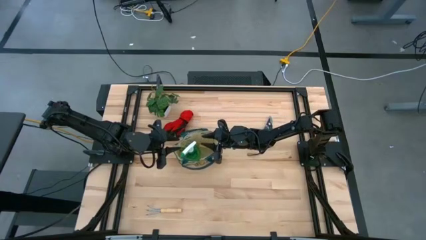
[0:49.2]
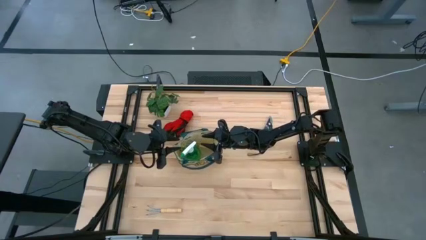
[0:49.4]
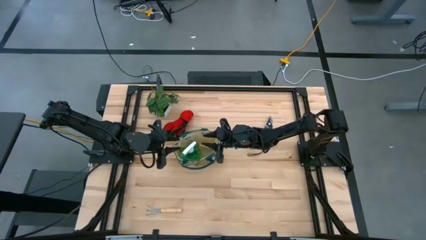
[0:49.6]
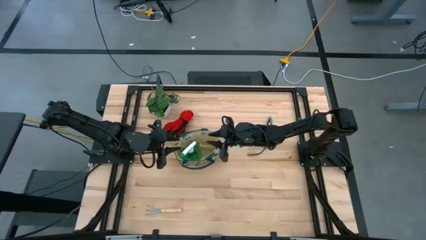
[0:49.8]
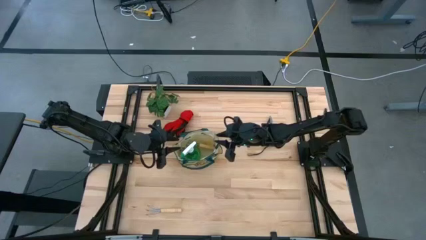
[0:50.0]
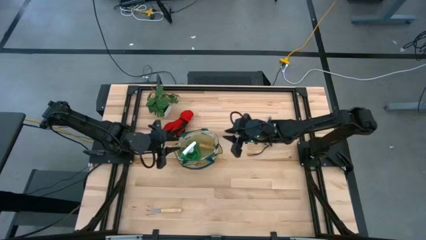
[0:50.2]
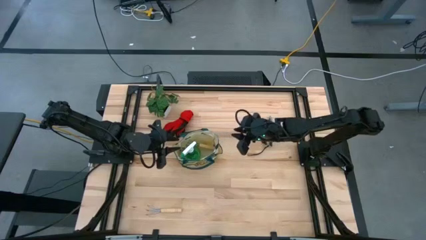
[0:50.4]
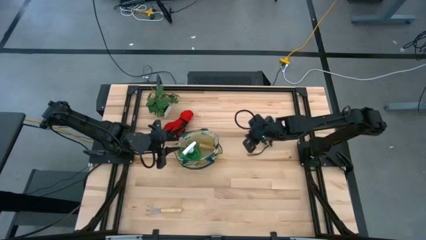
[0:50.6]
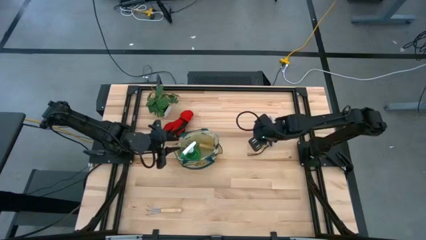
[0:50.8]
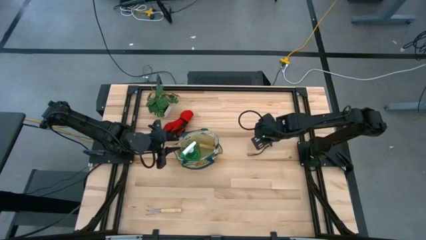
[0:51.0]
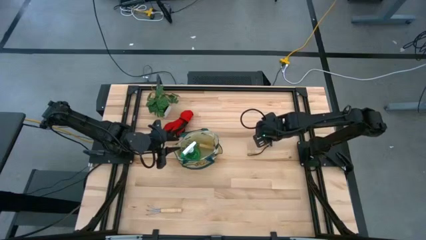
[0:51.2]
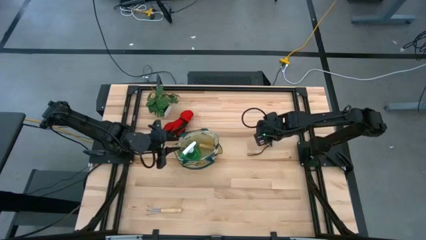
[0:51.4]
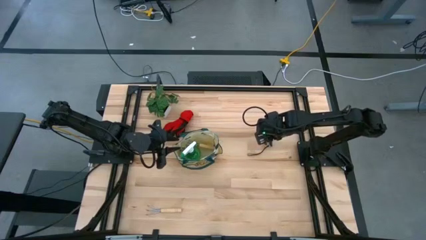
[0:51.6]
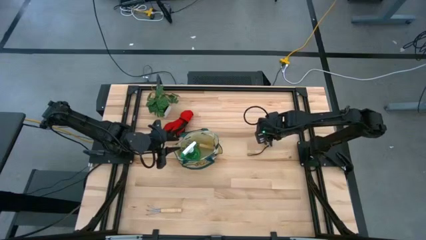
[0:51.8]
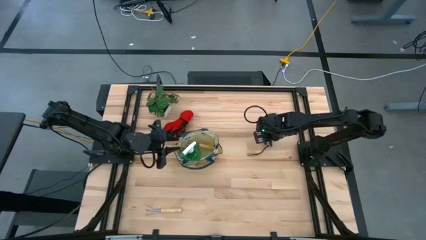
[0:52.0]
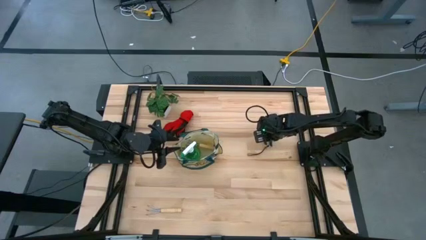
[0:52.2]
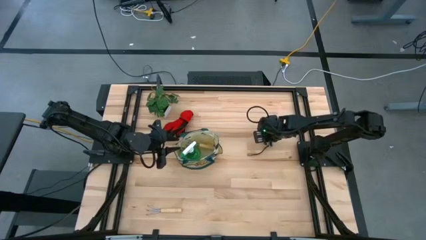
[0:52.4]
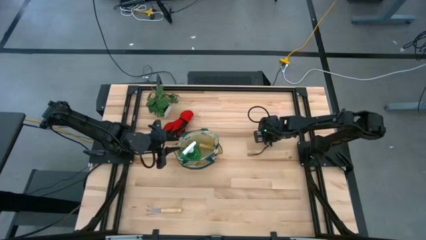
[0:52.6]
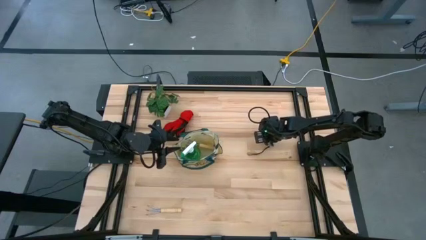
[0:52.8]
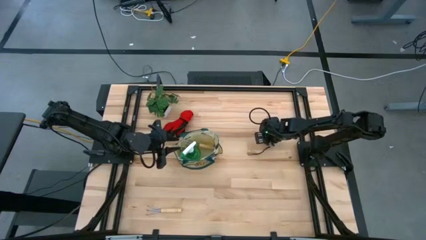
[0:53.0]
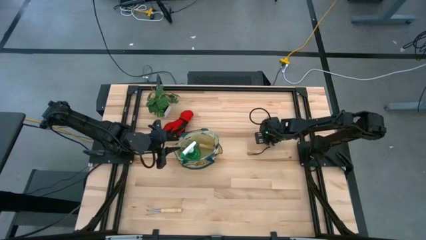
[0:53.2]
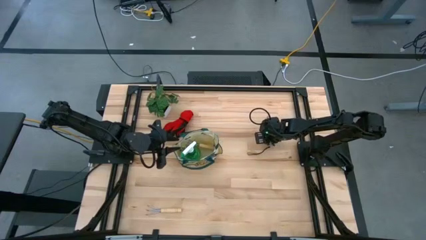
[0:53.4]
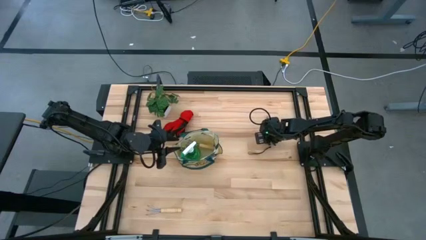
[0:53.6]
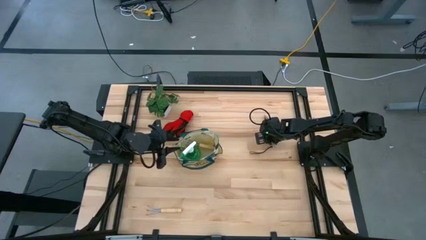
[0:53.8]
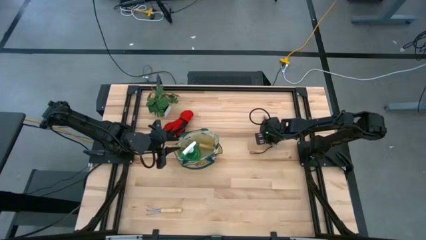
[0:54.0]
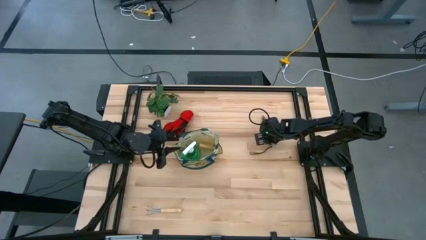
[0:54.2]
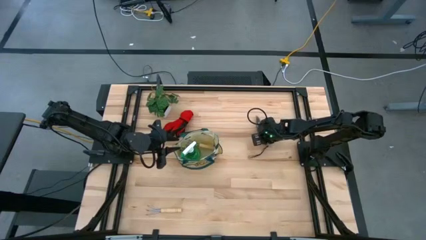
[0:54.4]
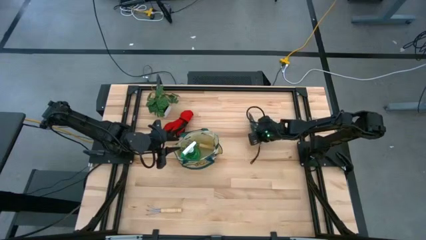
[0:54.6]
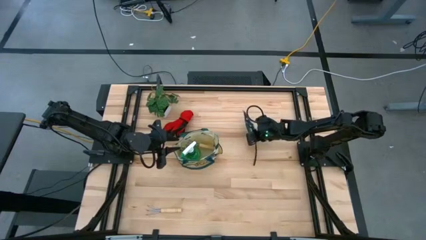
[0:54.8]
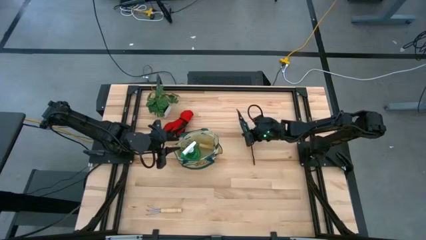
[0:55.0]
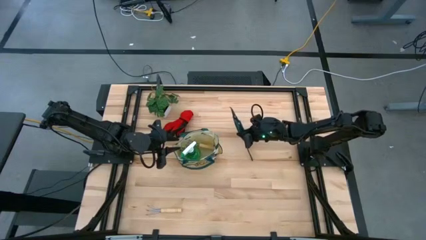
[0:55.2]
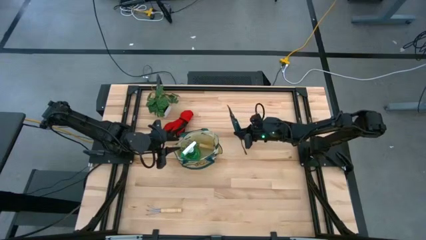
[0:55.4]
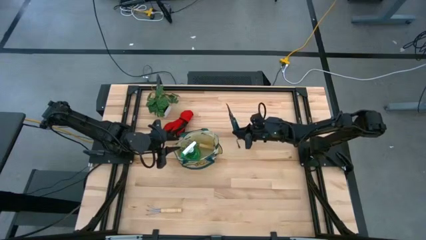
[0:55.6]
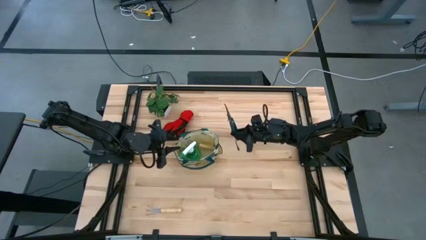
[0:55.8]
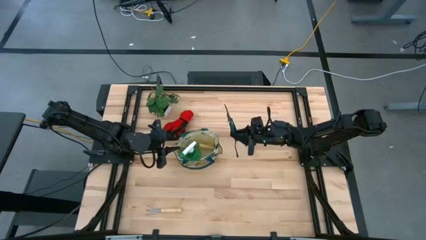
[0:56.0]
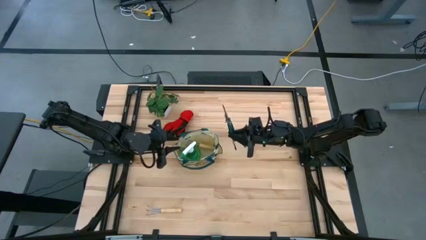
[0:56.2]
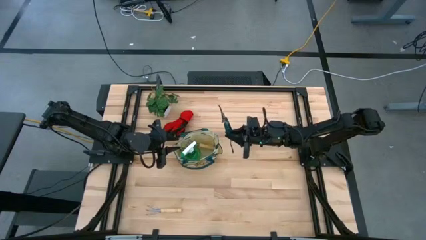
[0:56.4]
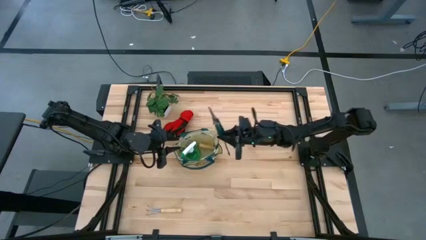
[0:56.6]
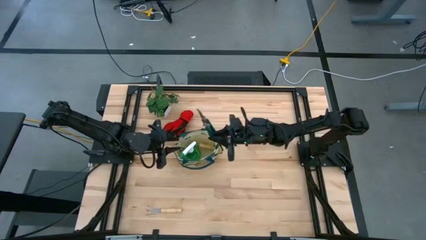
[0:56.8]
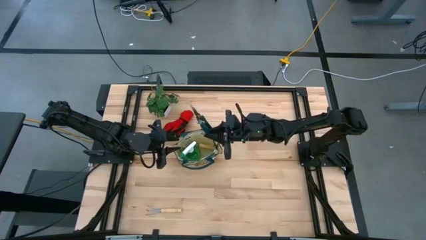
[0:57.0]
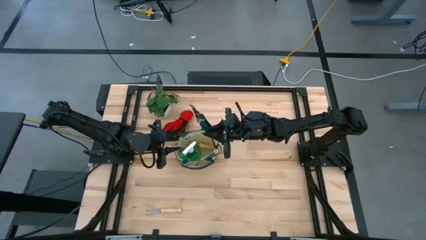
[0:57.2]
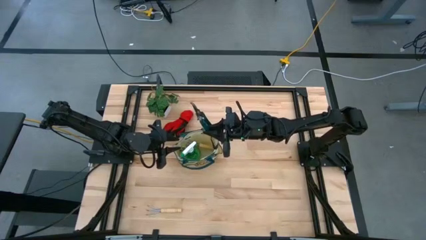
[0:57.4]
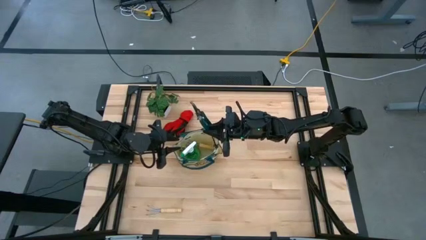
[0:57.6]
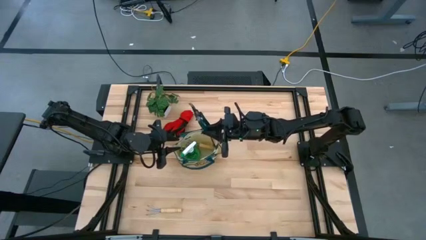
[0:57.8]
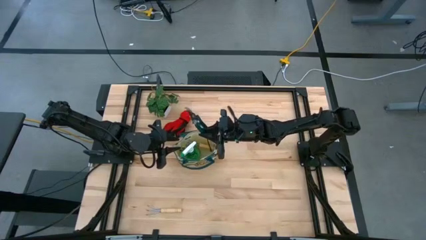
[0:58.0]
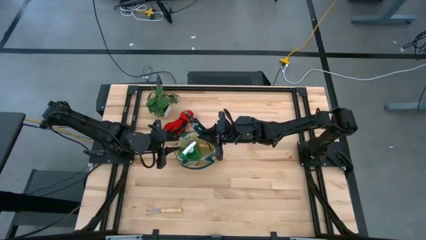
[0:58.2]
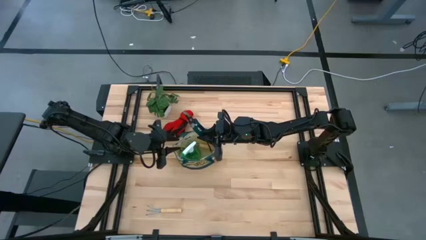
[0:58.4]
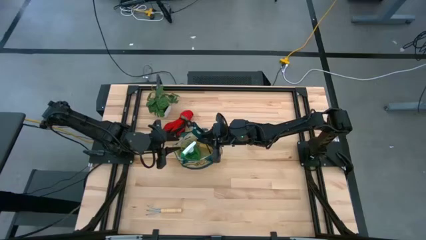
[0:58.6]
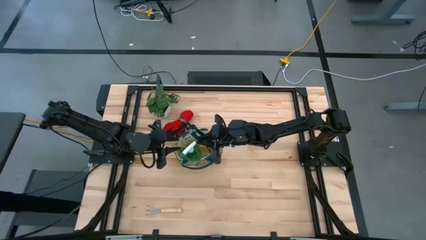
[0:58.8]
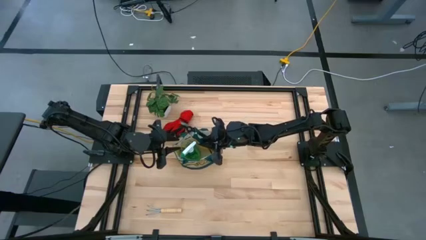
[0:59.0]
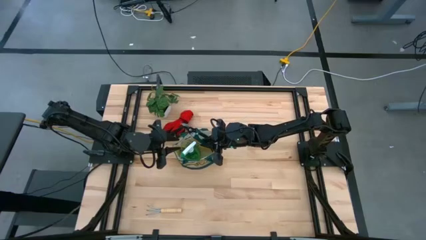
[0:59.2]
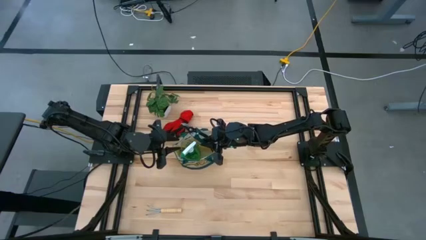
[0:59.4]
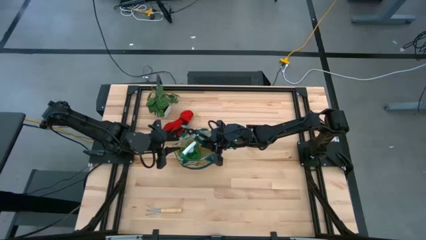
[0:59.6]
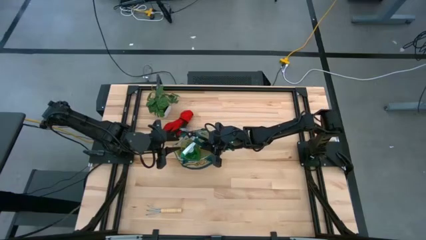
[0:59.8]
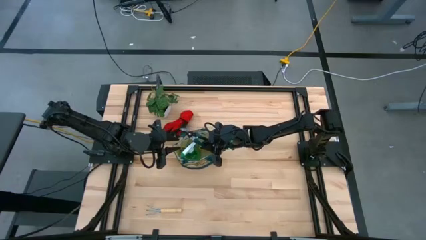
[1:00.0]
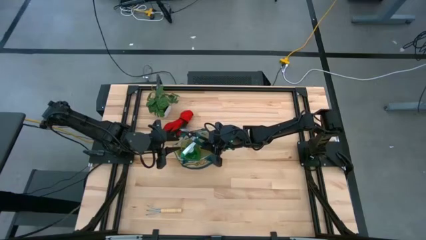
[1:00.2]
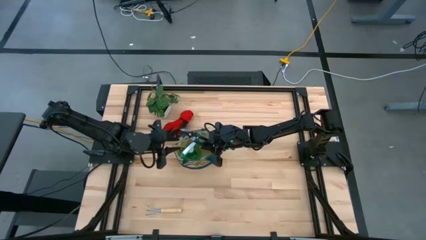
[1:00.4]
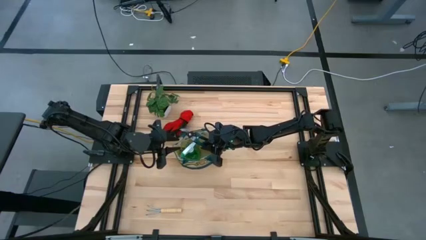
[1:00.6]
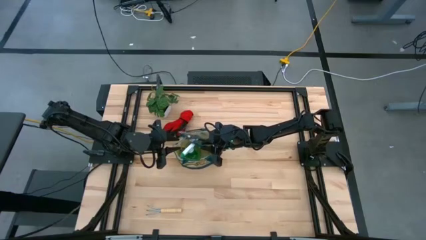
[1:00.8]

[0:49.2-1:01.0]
Task: Pick & Place Garden tools in Gardening bag
Put the shear scissors into the gardening bag
